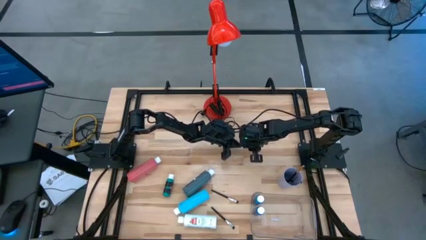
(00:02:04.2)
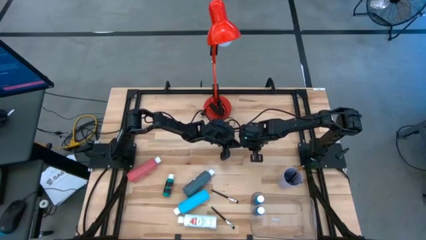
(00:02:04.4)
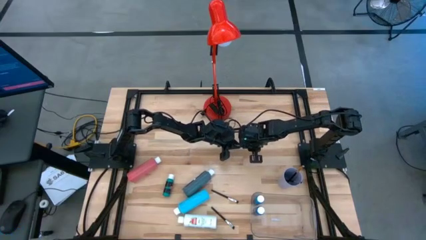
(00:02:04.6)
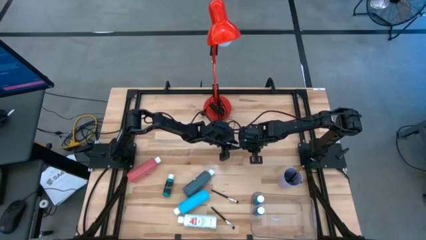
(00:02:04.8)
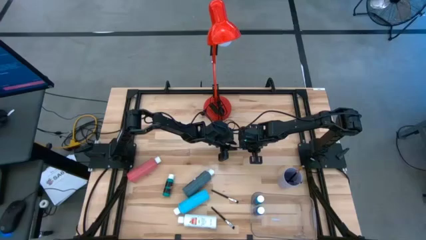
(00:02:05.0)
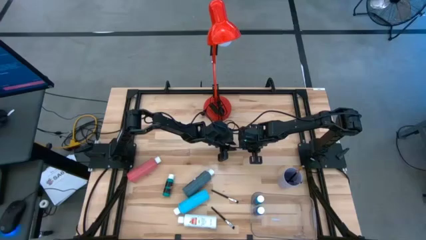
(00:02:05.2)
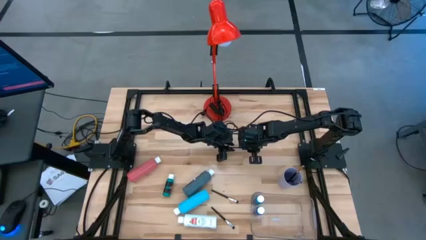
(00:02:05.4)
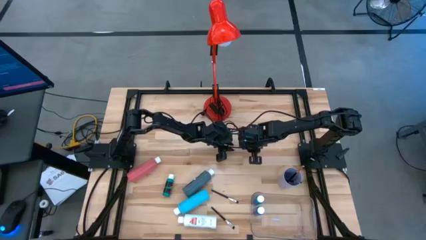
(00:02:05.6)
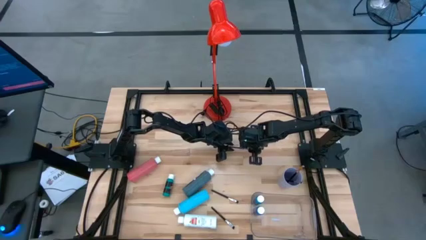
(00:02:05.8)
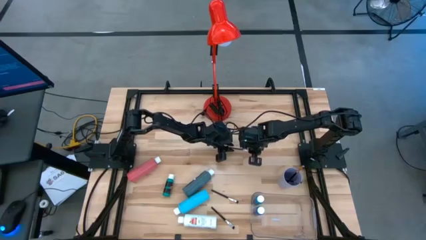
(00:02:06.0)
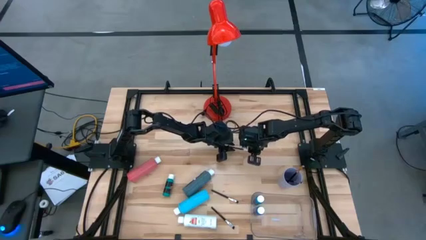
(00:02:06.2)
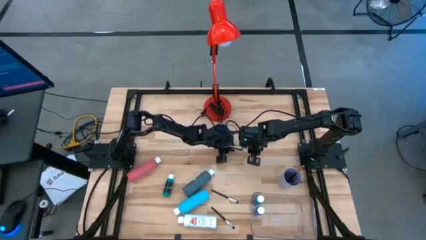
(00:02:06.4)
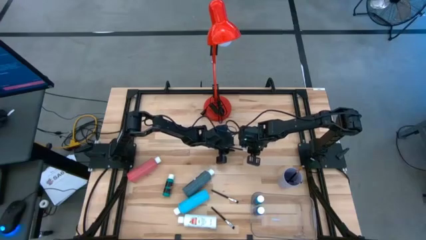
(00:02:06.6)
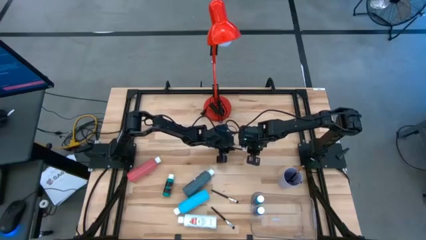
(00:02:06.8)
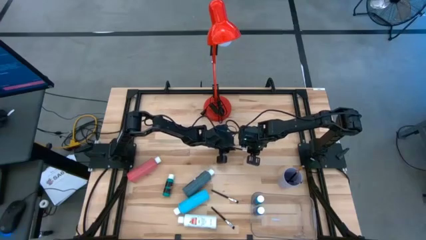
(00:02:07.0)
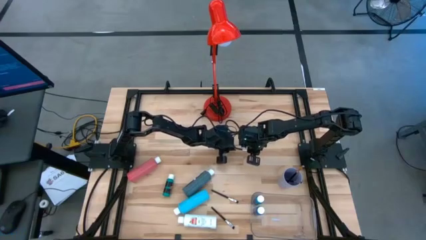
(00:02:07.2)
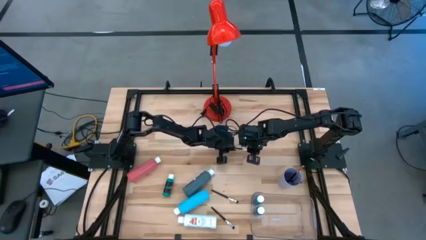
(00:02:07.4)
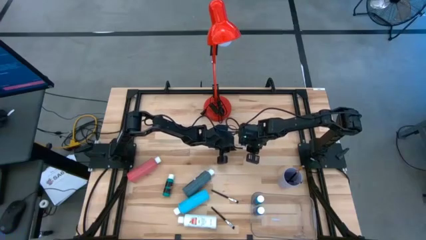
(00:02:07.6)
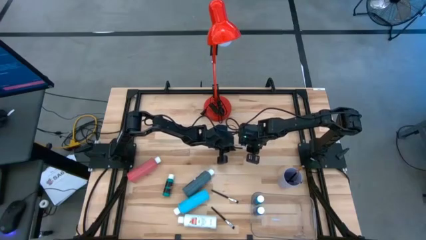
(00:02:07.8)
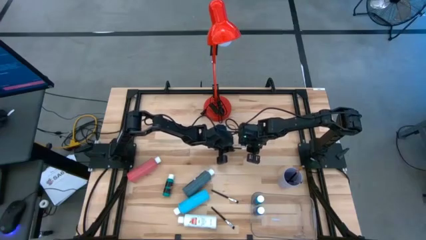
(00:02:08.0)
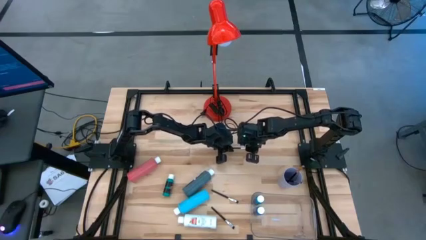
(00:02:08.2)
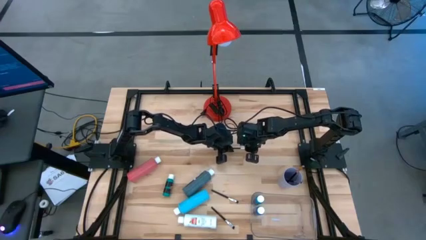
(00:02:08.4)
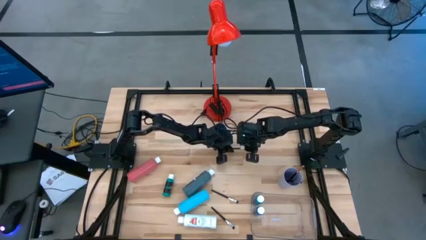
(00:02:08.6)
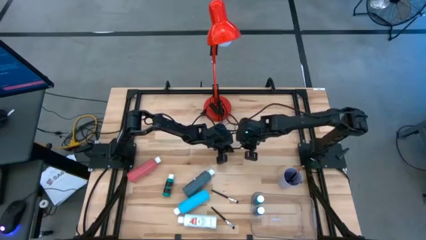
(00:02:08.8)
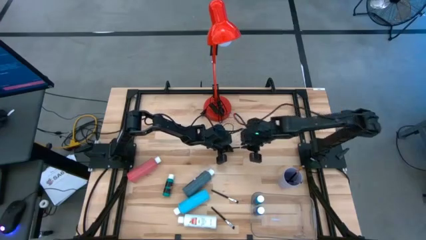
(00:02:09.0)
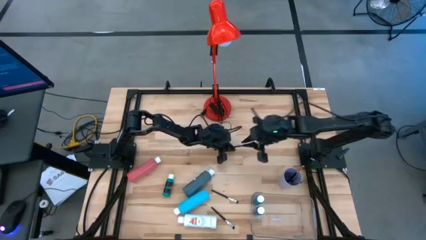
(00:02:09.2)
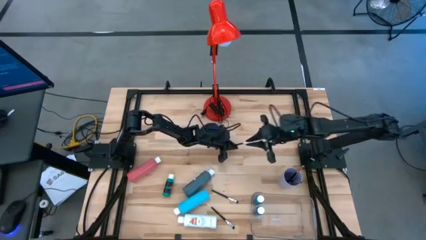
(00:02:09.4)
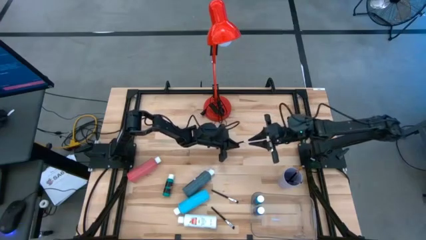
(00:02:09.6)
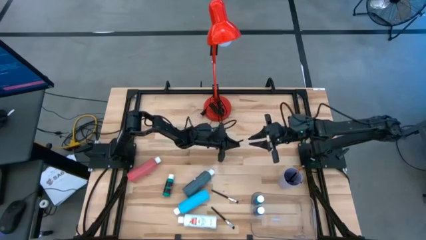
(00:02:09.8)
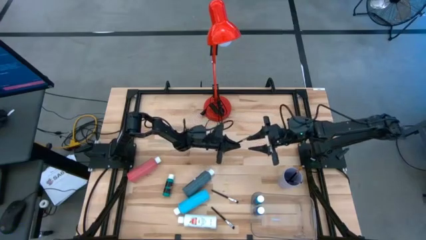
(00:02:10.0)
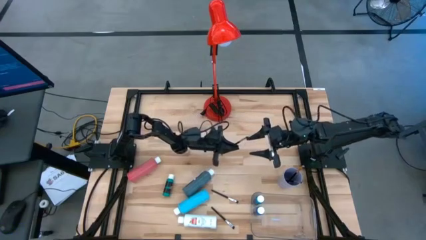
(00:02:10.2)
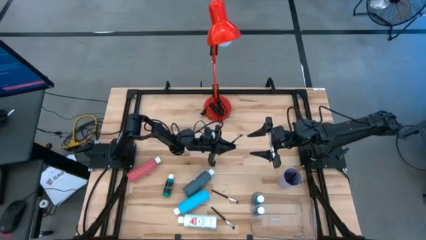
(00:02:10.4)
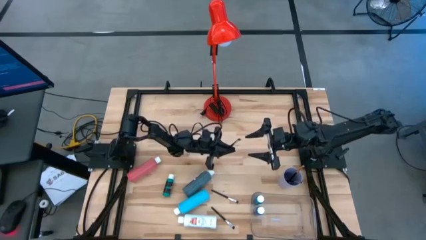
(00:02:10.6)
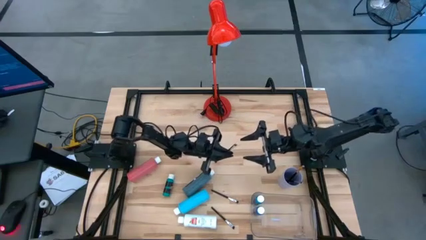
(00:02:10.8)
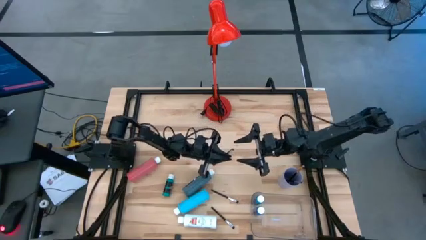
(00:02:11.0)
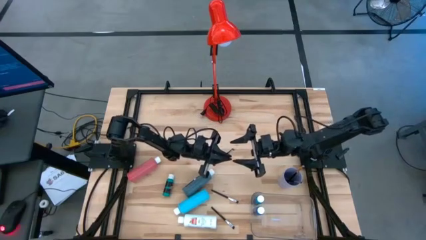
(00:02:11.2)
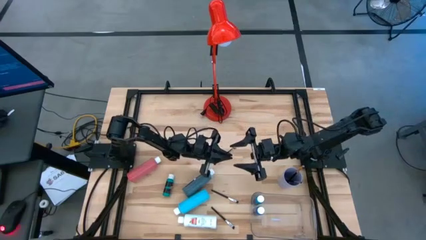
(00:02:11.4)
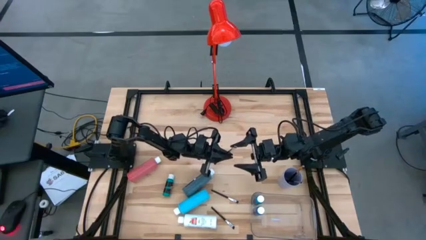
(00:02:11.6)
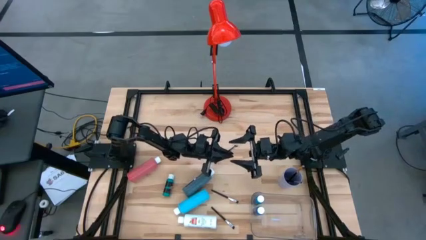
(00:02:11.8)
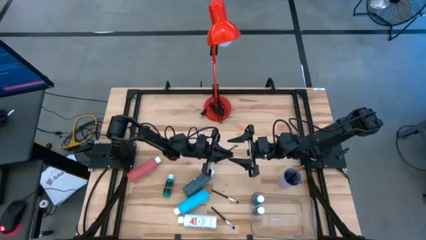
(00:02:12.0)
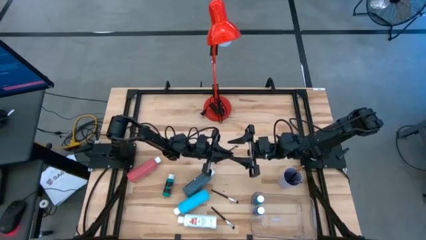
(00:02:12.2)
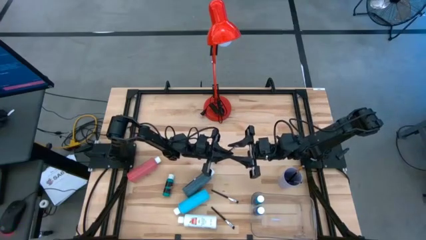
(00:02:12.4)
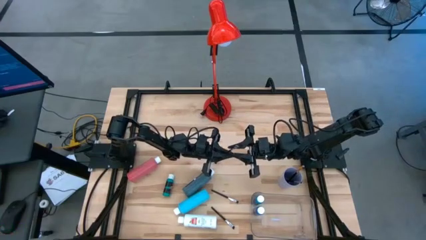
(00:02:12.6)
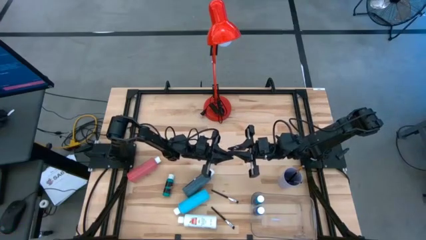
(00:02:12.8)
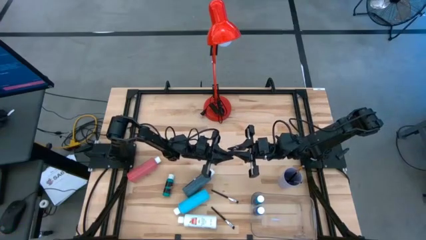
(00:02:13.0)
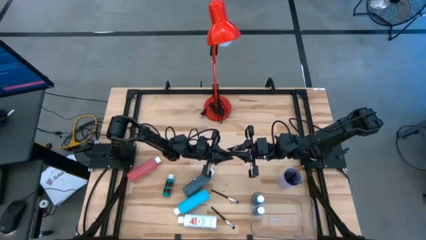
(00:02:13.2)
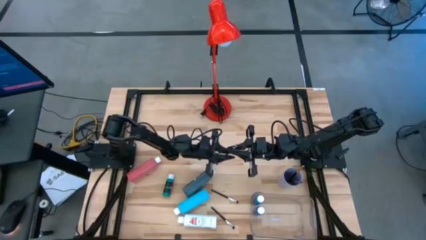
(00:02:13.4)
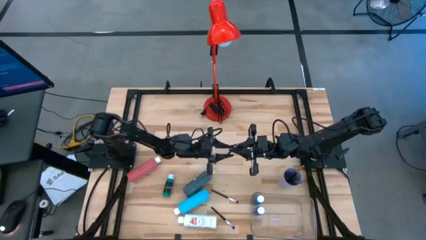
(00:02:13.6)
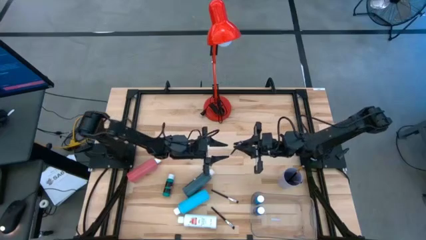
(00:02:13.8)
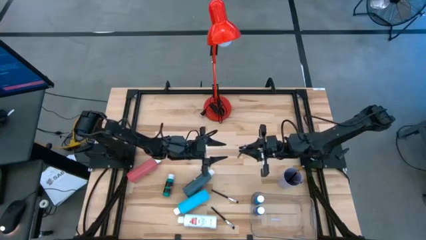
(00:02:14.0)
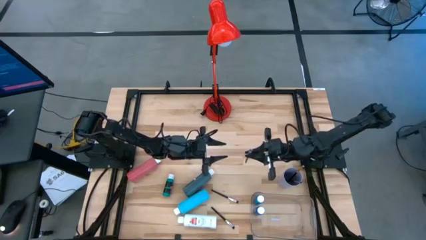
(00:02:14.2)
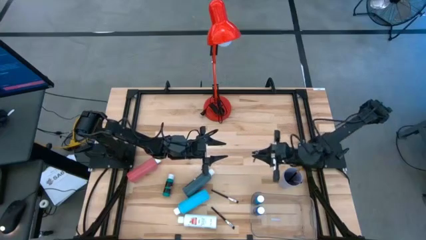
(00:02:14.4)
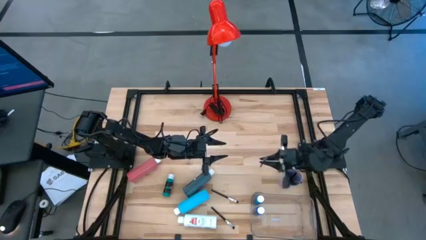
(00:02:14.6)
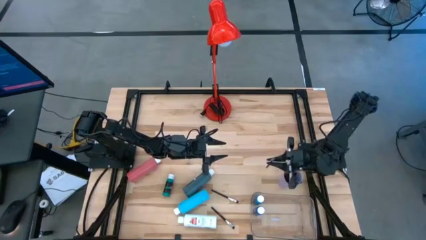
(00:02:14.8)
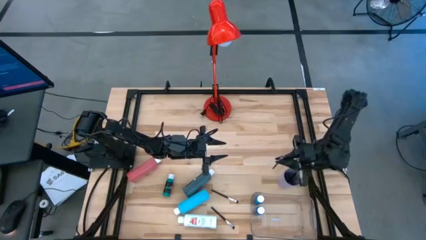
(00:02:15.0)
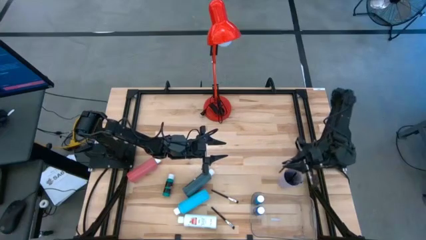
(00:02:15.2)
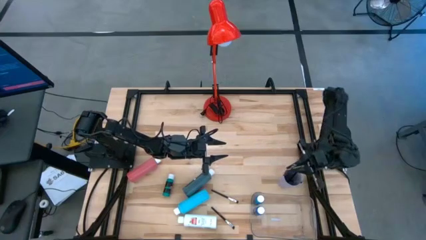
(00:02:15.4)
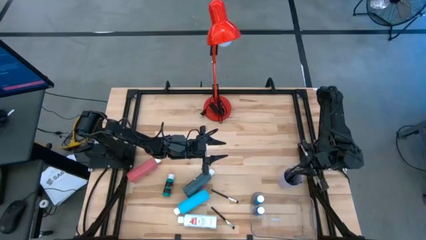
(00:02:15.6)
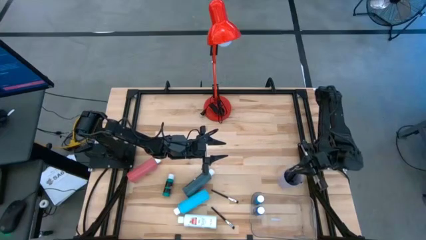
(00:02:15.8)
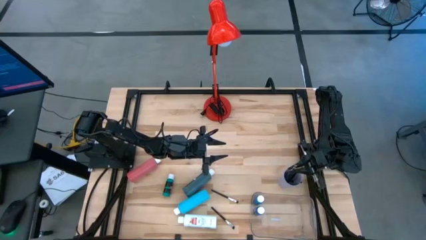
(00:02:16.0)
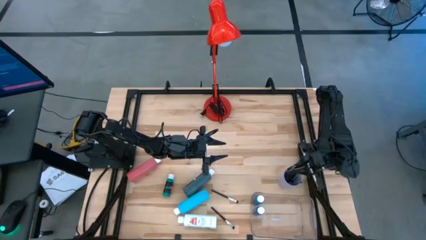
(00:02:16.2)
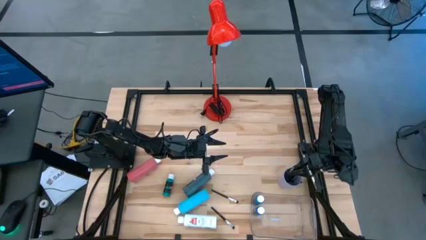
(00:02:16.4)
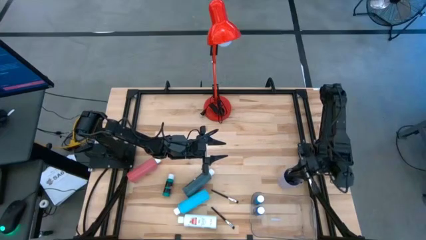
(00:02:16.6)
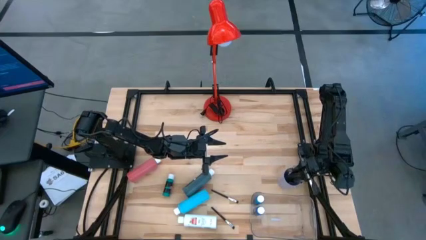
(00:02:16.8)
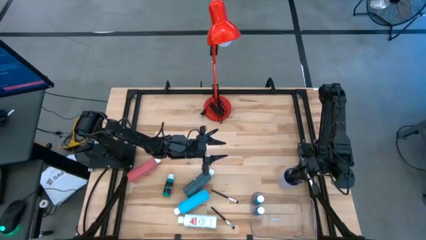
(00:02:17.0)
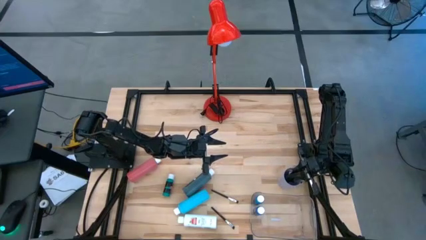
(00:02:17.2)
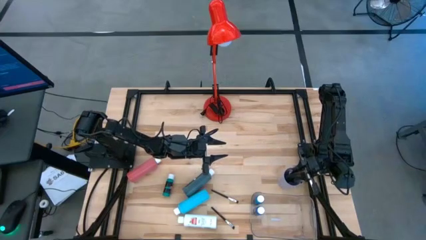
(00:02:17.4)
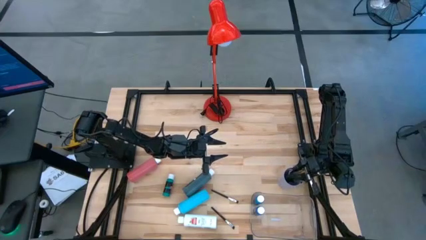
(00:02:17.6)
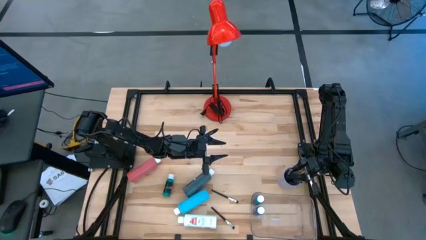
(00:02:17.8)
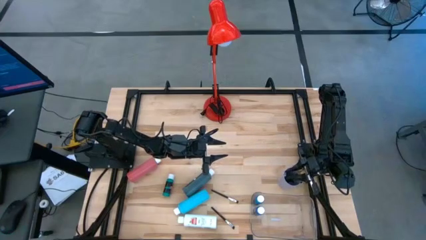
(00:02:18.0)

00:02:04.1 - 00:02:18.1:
Task: Pick & Place Paint Supplies
Put the black silver paint brush into the purple cup

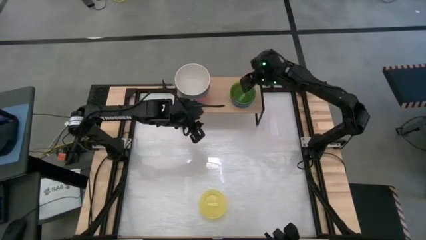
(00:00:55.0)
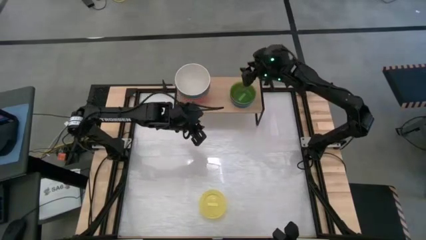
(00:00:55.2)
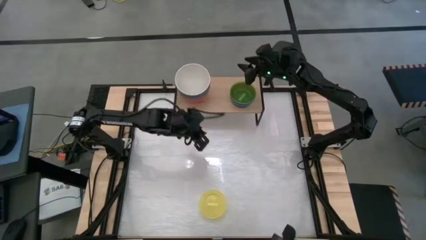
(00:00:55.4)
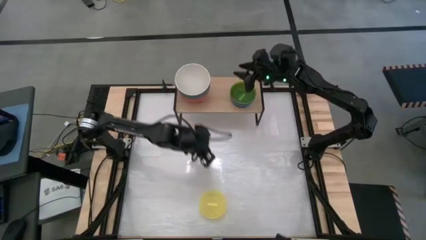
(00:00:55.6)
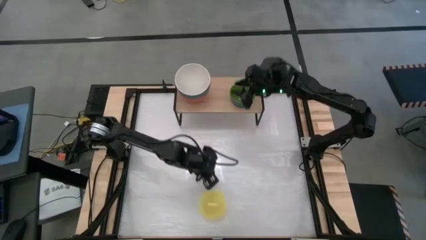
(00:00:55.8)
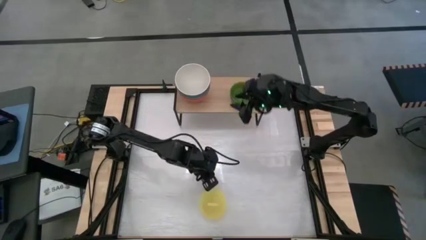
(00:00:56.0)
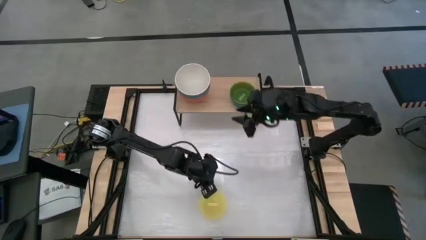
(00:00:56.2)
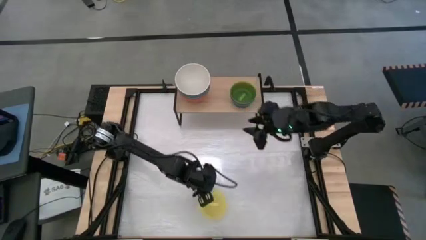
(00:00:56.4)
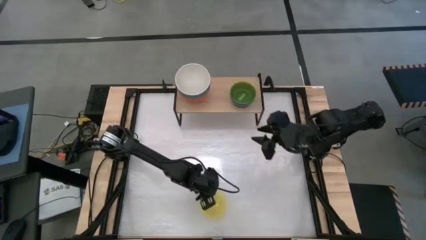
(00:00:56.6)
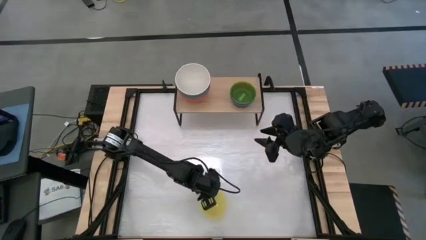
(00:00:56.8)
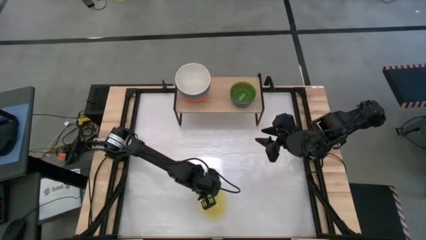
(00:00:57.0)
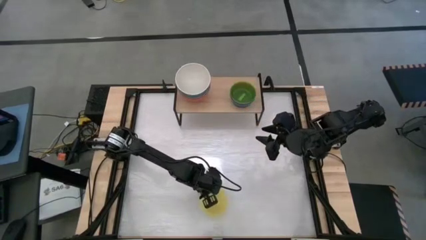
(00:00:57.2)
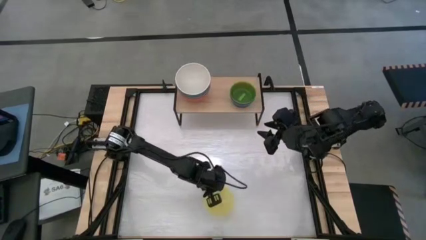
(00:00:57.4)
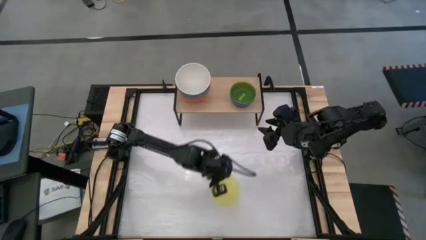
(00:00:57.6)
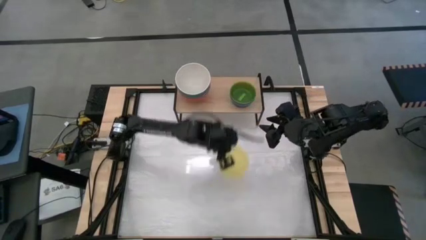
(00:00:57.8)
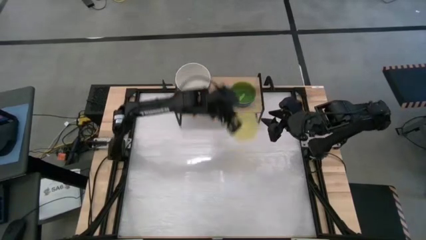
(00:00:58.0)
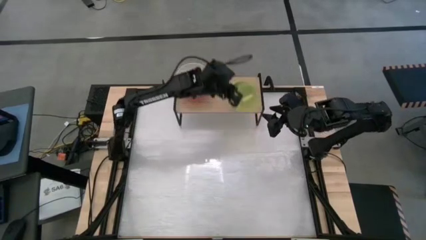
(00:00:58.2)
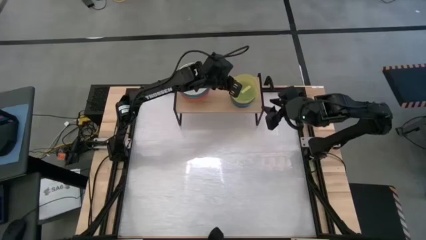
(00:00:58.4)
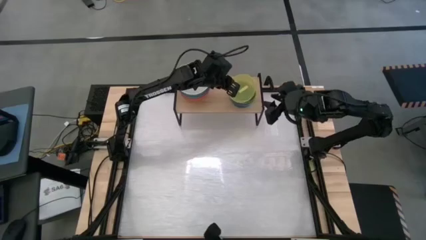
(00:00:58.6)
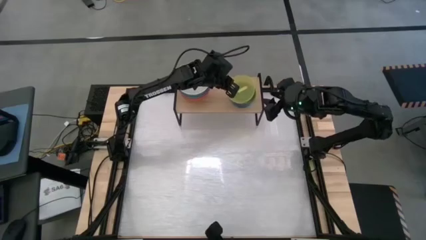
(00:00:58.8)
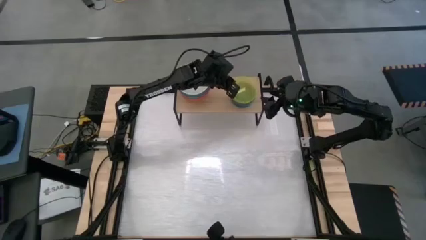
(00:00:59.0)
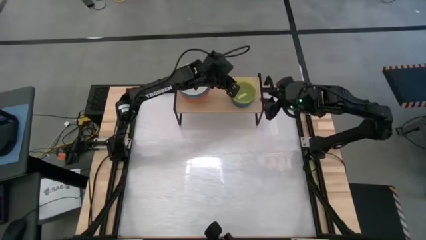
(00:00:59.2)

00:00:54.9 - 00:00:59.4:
Task: Place and stack bowls onto a shelf
Stack the light yellow bowl on top of the light green bowl on the shelf
